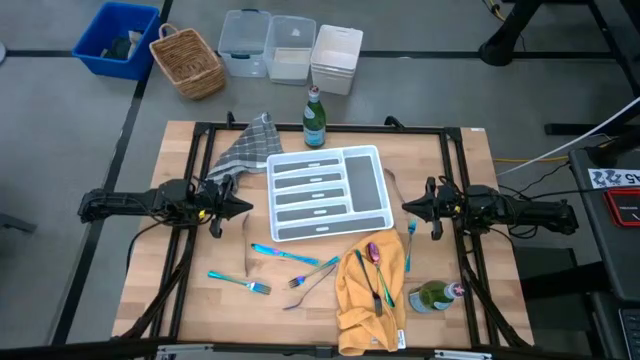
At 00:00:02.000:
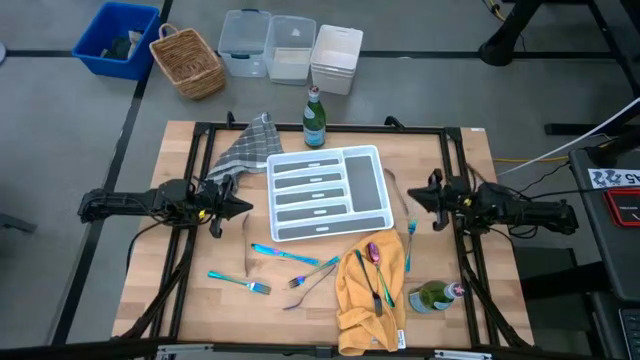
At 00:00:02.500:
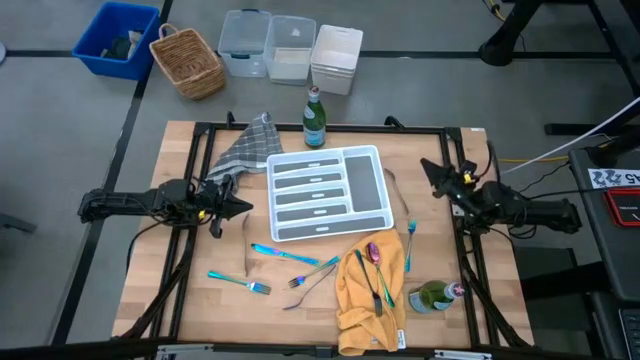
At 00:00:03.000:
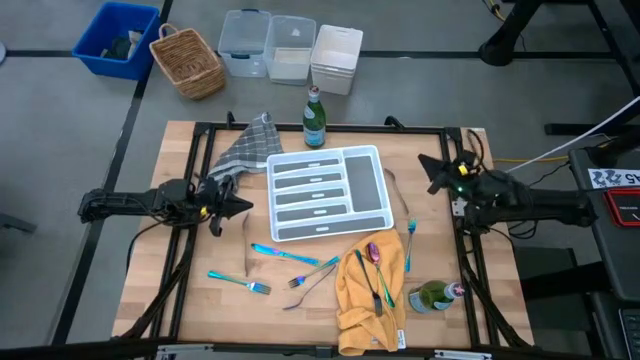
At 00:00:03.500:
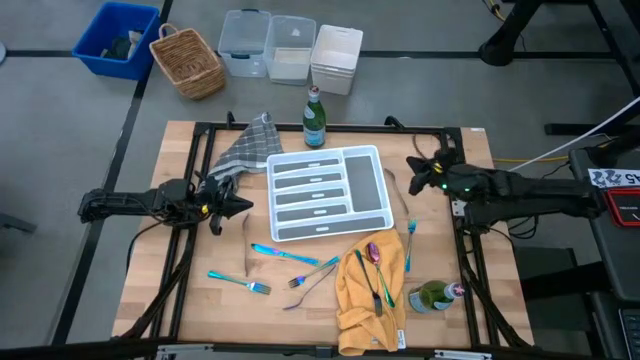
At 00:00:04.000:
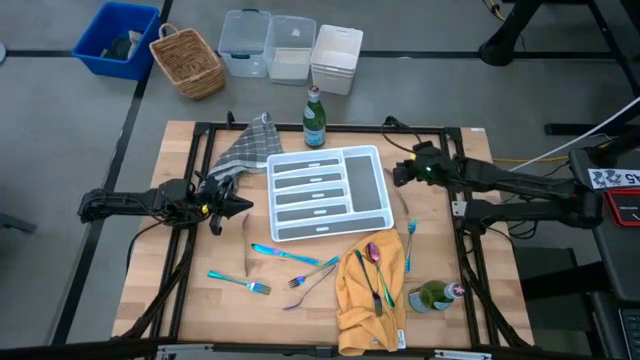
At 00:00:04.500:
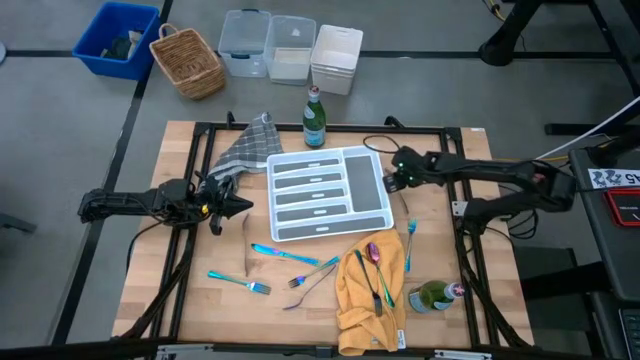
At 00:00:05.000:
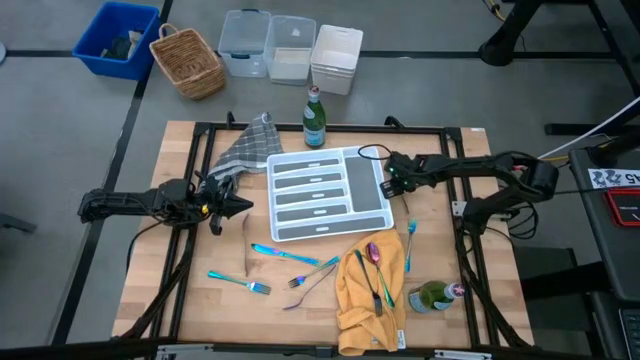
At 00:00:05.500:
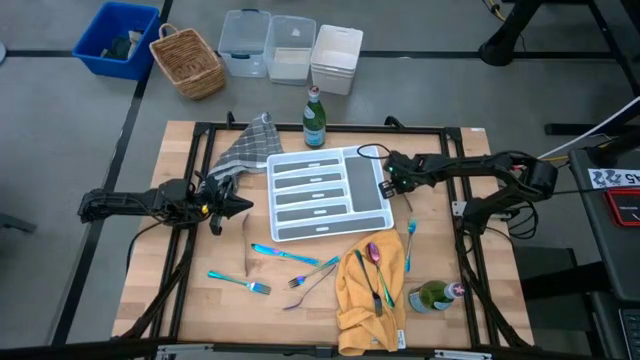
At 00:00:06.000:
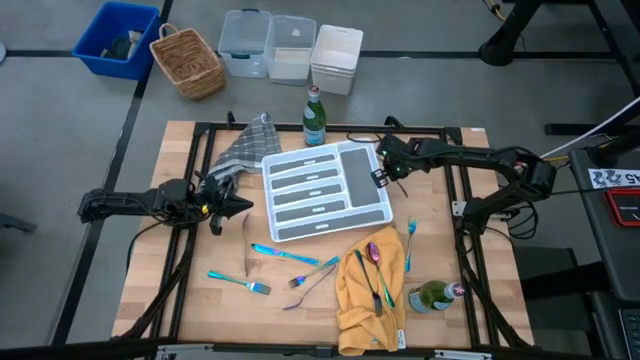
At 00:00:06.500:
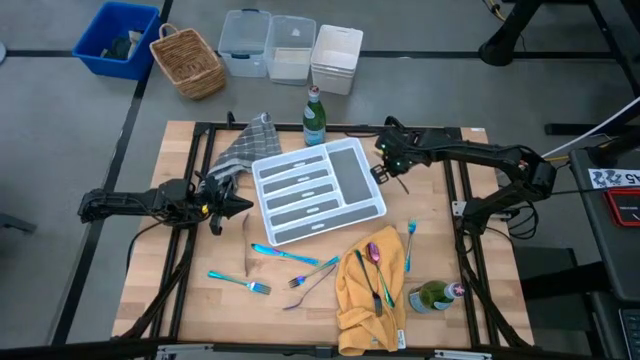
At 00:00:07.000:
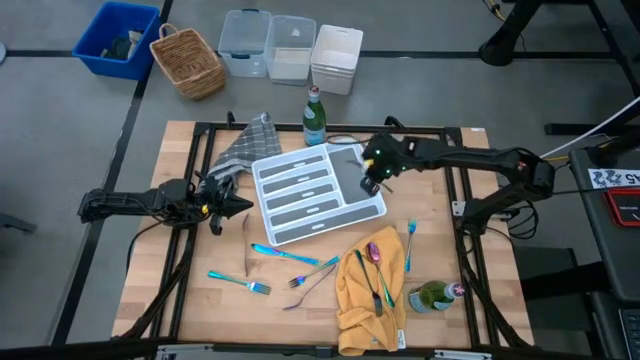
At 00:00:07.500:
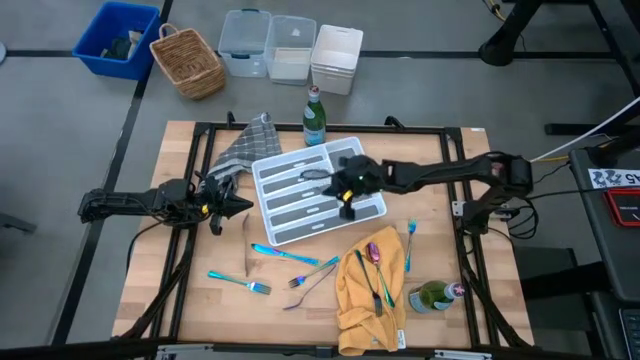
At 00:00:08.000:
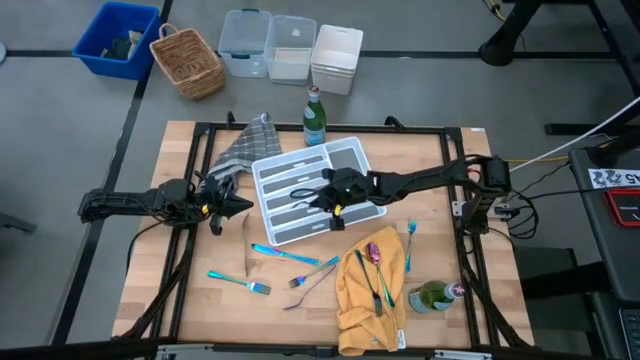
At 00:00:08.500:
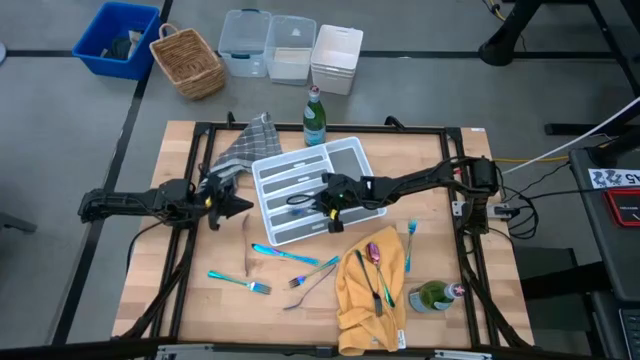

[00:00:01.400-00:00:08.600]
Task: Sort silverware
Put the fork in the silverware tray

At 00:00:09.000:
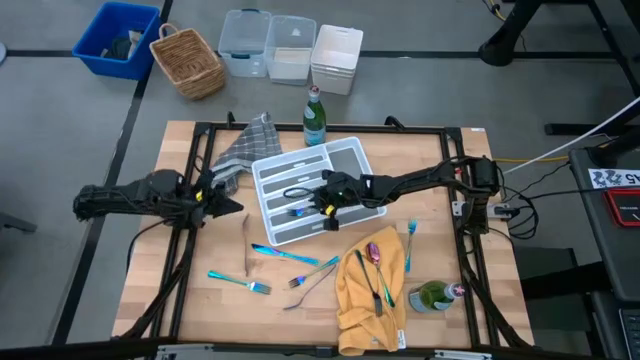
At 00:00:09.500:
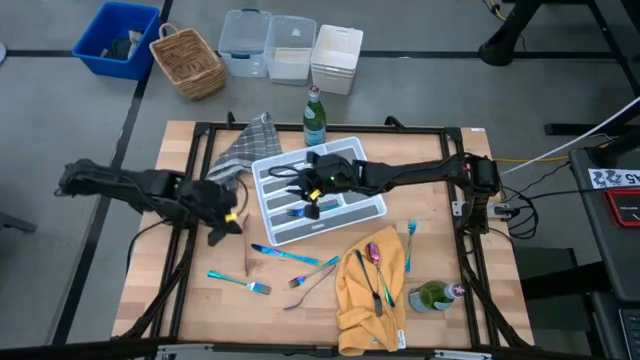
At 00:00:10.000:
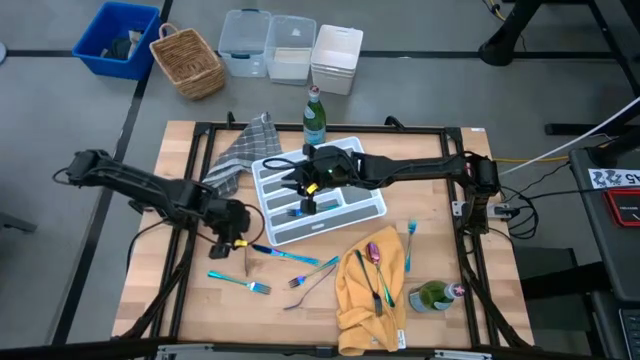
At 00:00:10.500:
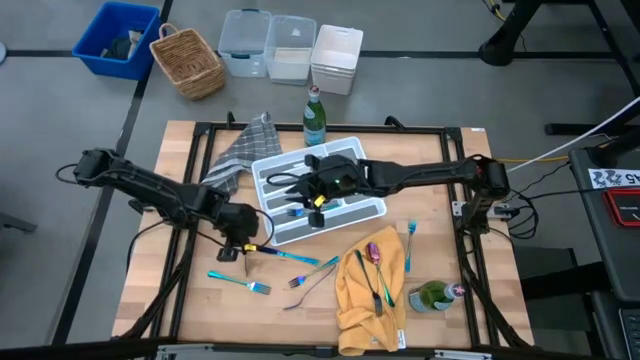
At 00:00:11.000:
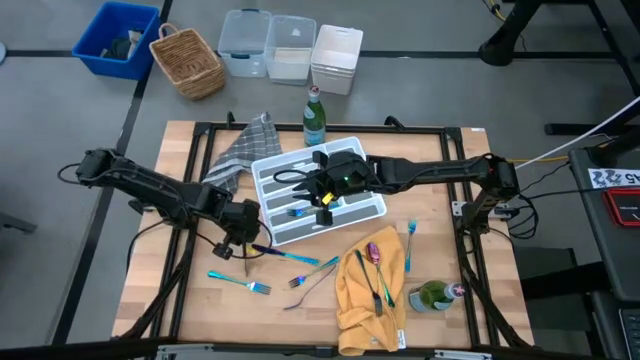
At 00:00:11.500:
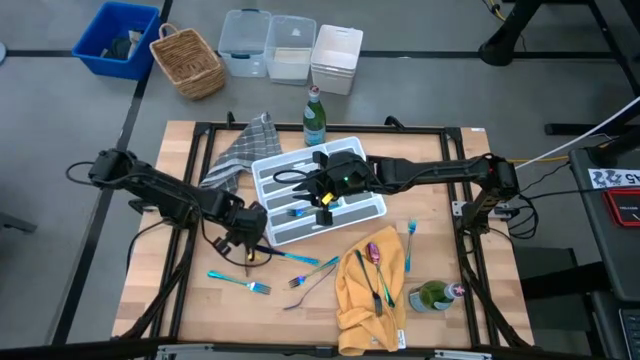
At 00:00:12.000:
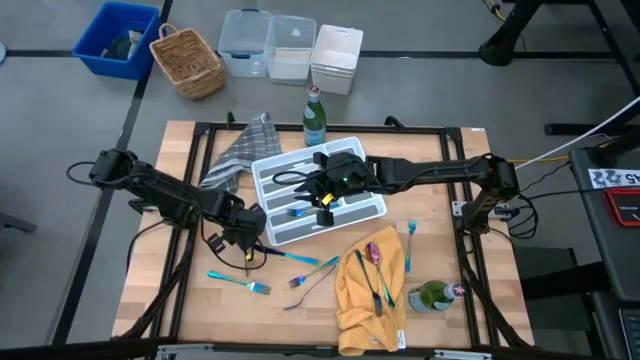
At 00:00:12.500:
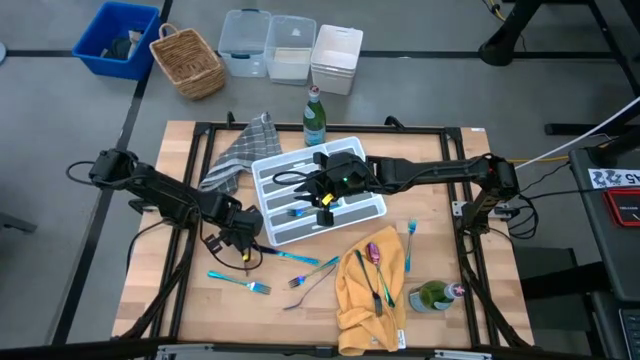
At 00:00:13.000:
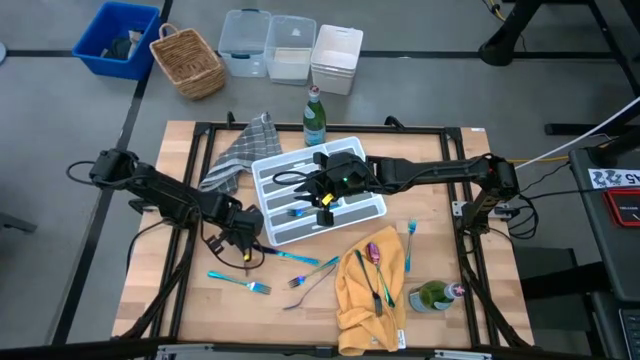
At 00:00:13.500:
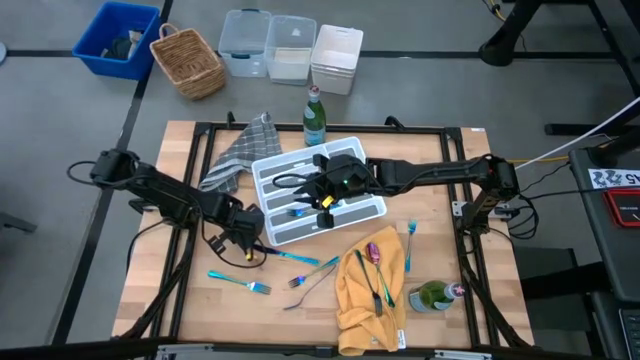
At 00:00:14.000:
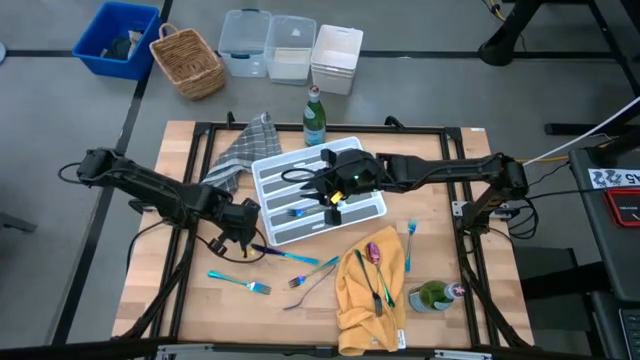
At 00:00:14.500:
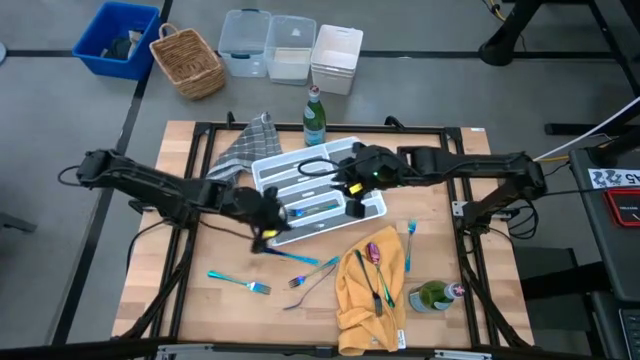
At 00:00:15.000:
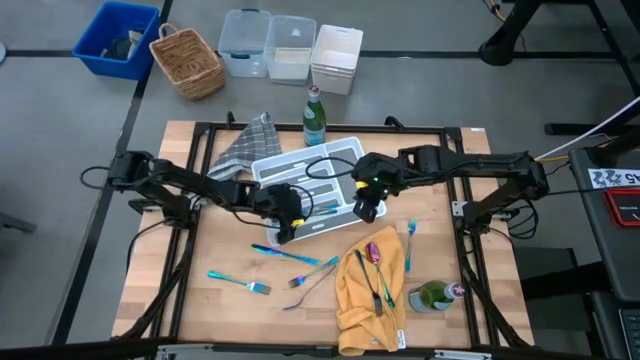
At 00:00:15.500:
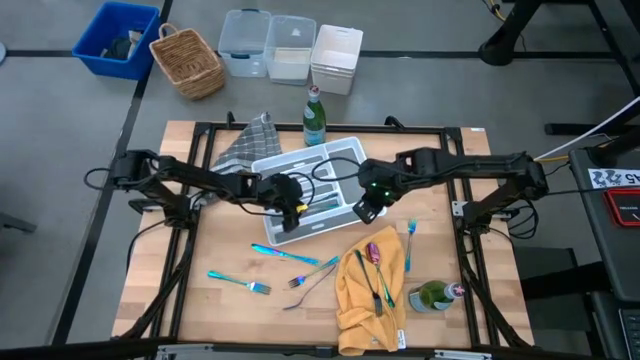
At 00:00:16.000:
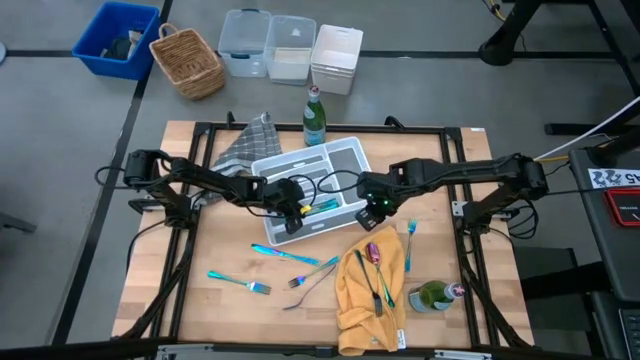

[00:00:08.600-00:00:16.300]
Put the fork in the silverware tray

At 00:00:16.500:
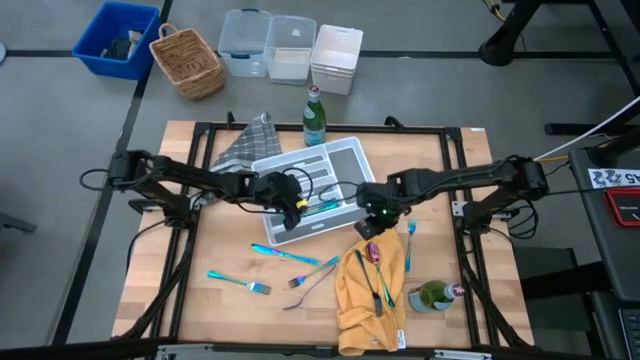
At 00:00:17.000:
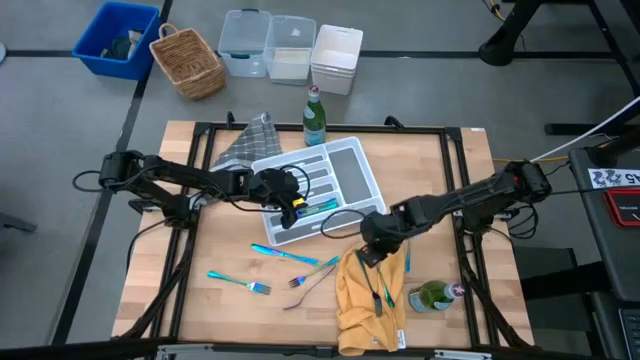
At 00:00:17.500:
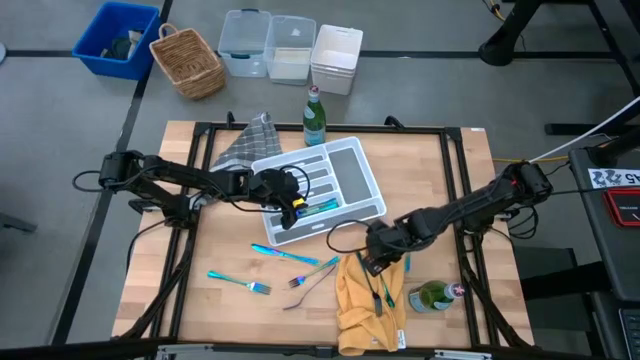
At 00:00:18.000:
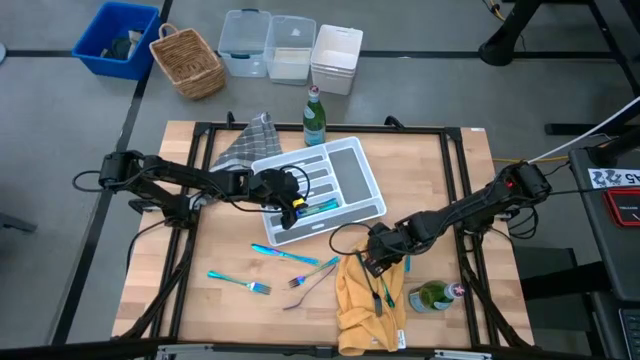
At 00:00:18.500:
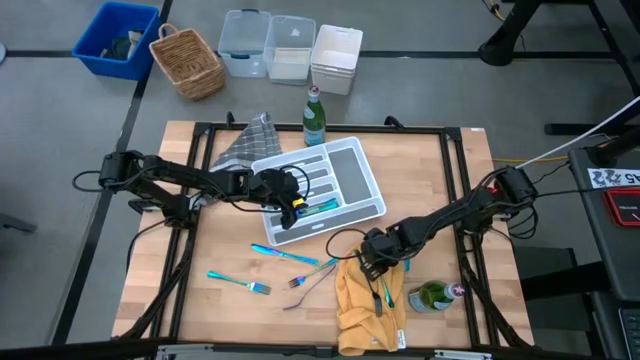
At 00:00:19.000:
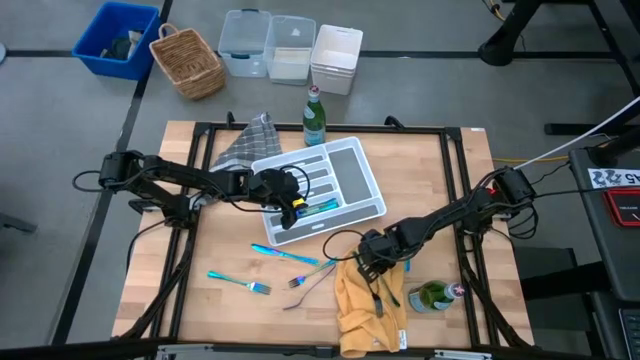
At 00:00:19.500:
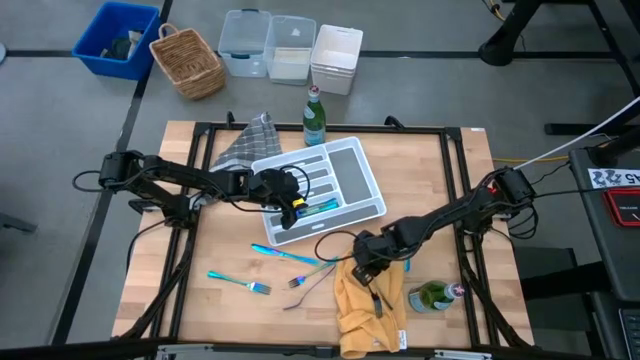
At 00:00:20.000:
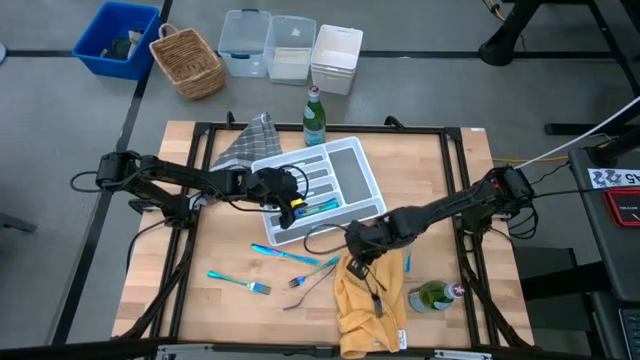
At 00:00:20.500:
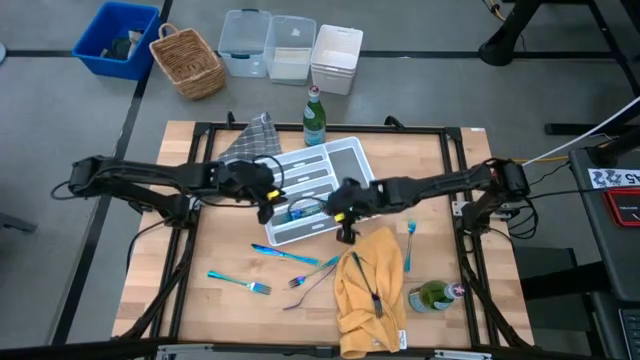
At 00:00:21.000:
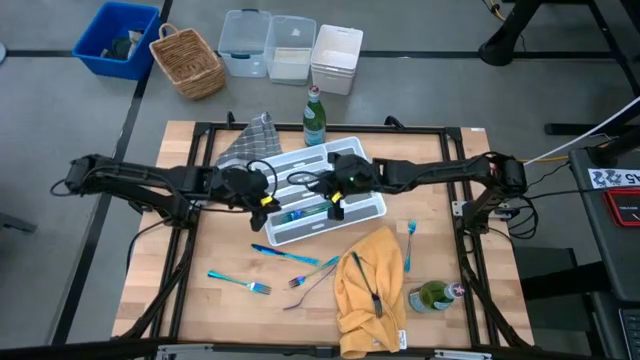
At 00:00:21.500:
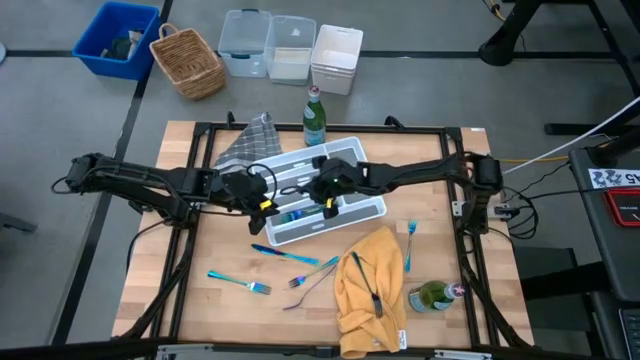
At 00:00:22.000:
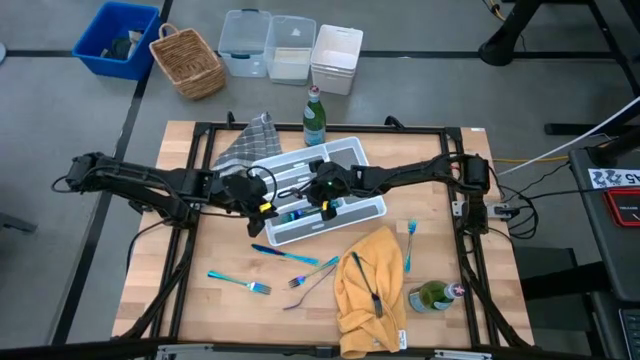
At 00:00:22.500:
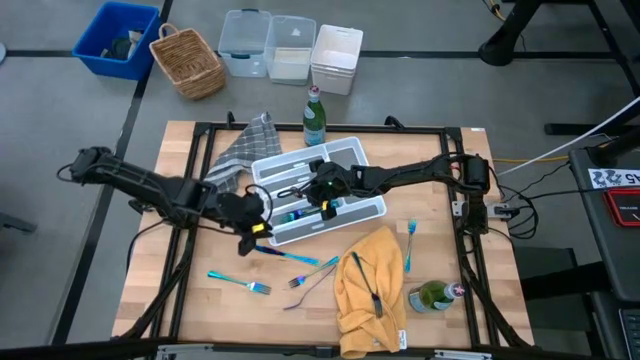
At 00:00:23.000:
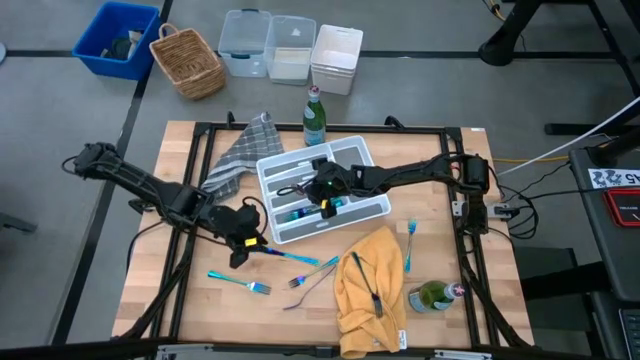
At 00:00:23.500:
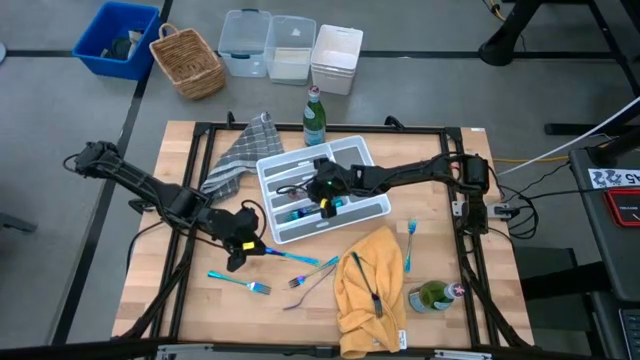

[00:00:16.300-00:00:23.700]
Put the spoon in the silverware tray

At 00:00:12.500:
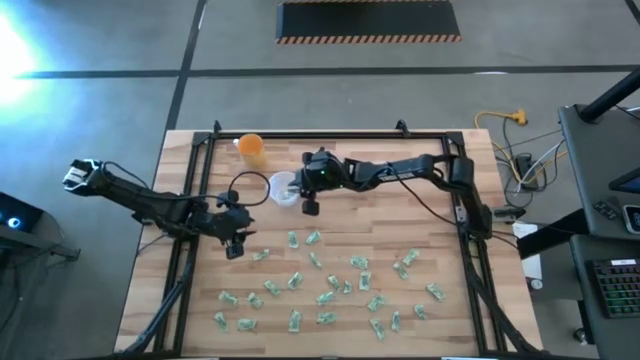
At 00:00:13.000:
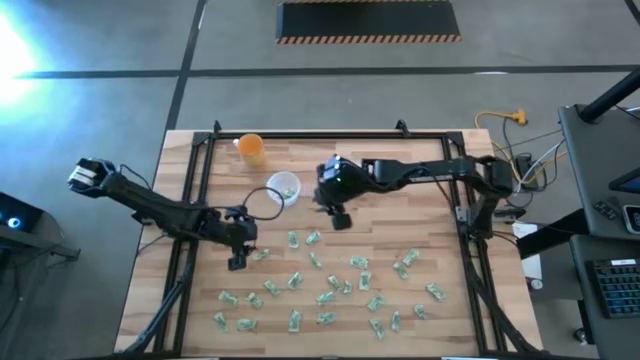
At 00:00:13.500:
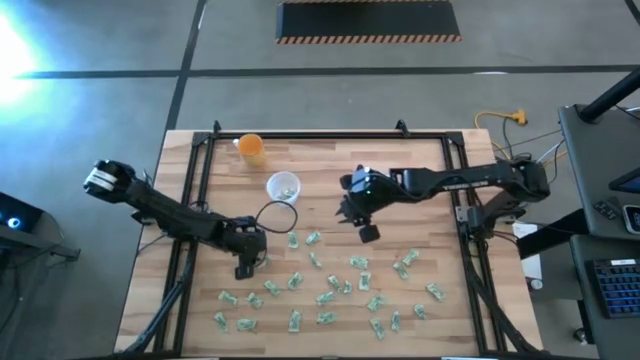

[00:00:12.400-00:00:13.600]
Task: Pick and place Stevia / Truvia into bins
Put the stevia packet into the transparent container
